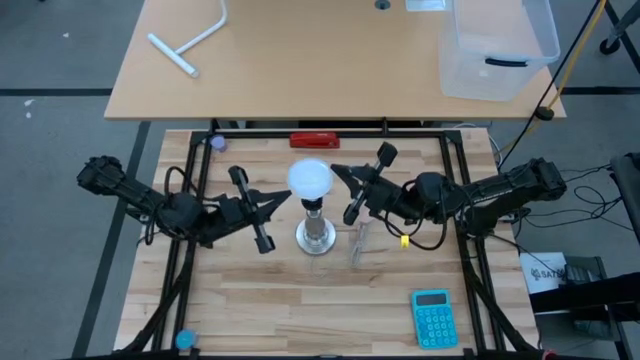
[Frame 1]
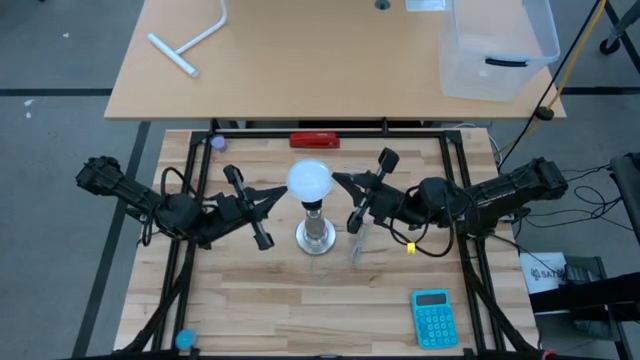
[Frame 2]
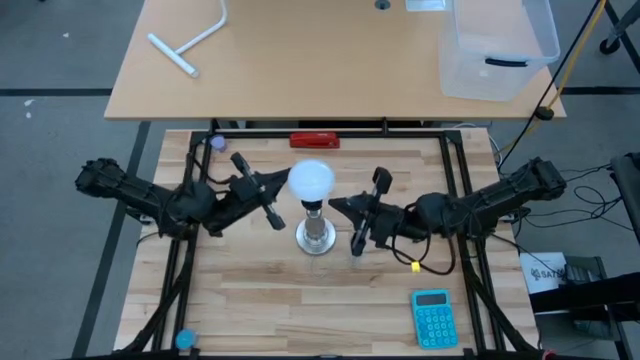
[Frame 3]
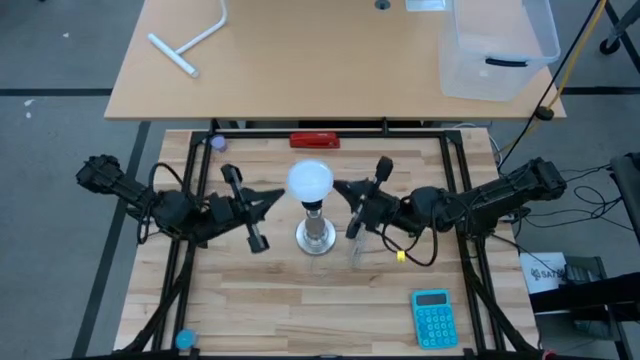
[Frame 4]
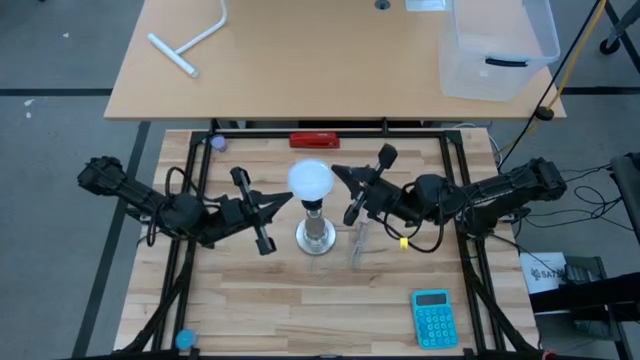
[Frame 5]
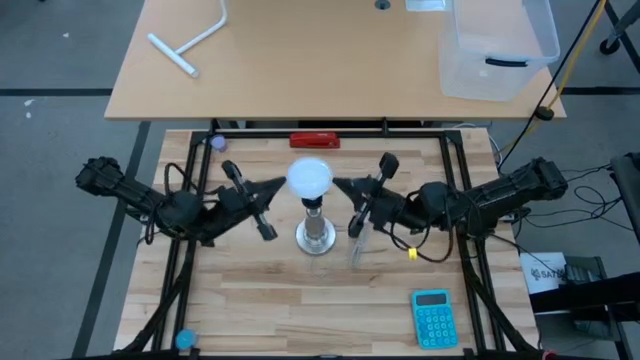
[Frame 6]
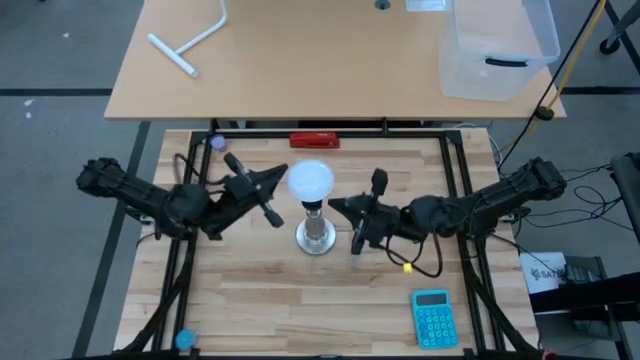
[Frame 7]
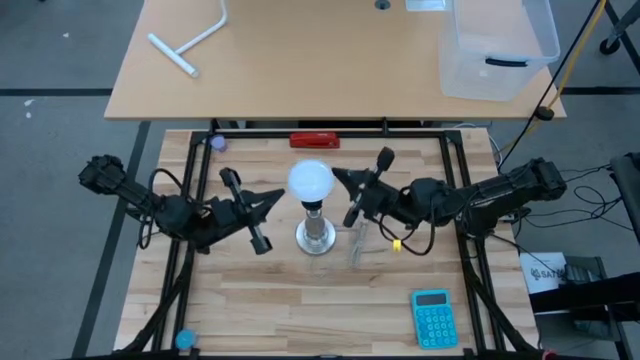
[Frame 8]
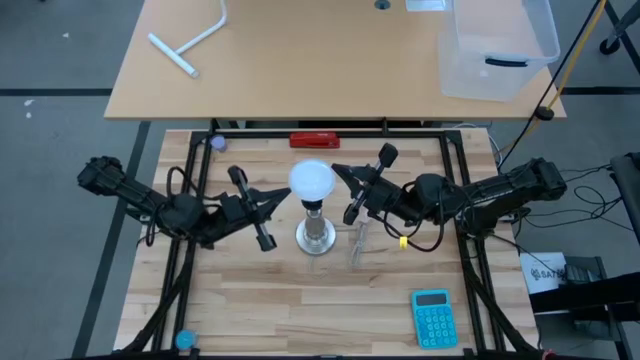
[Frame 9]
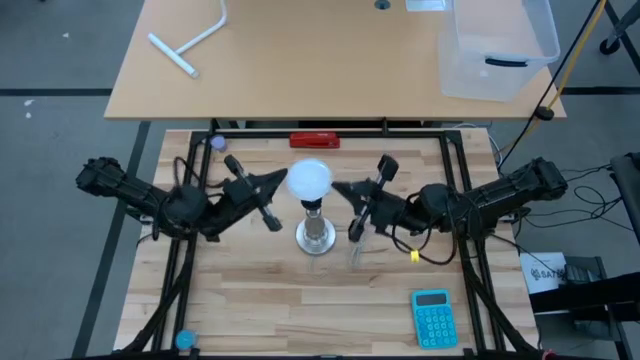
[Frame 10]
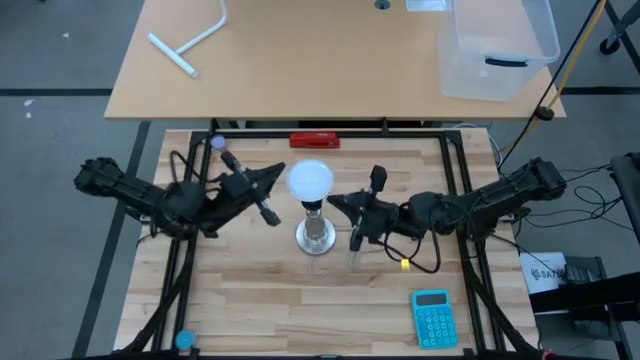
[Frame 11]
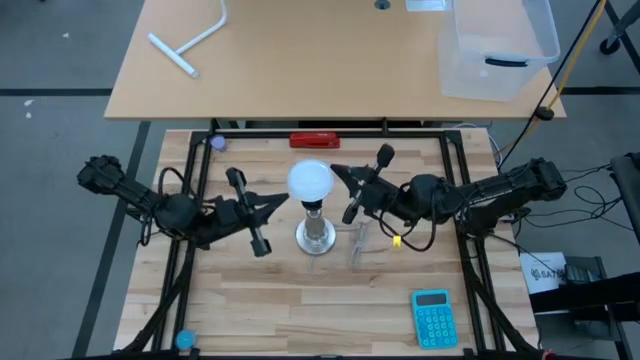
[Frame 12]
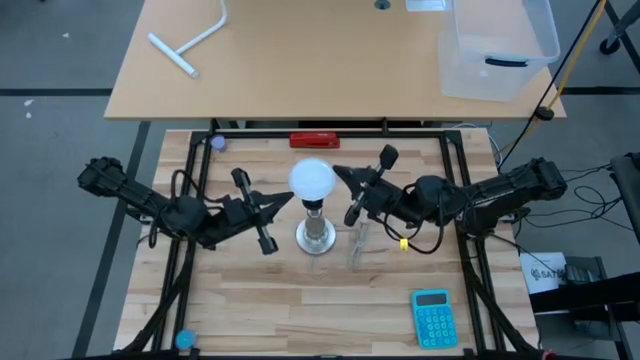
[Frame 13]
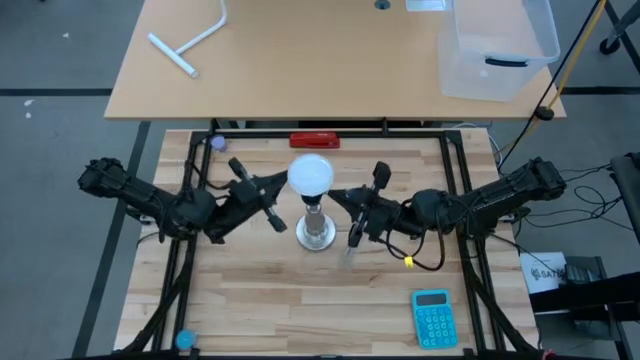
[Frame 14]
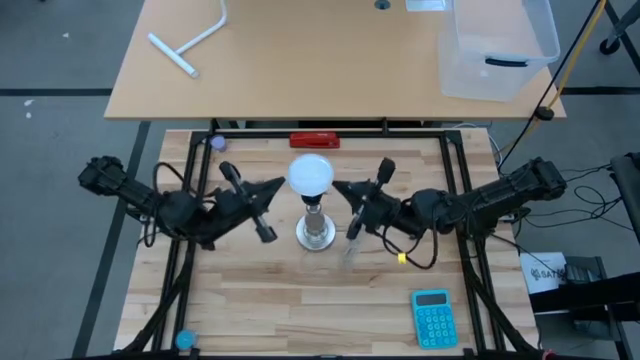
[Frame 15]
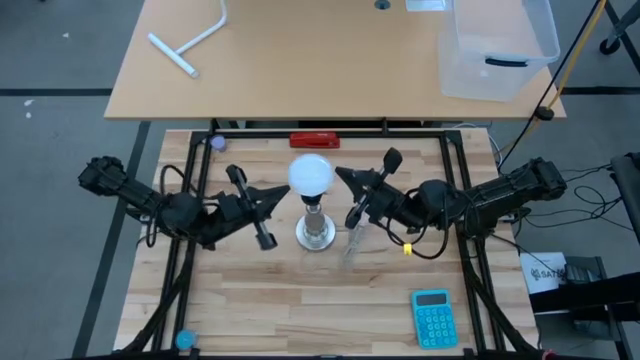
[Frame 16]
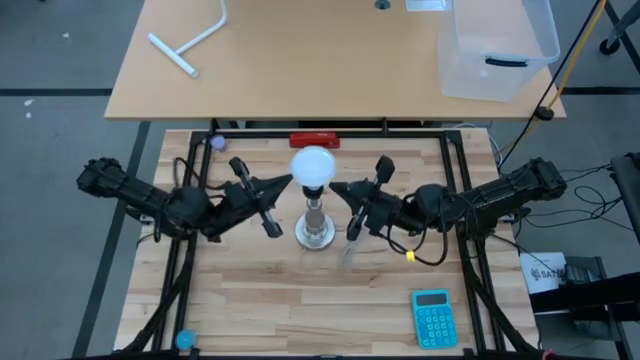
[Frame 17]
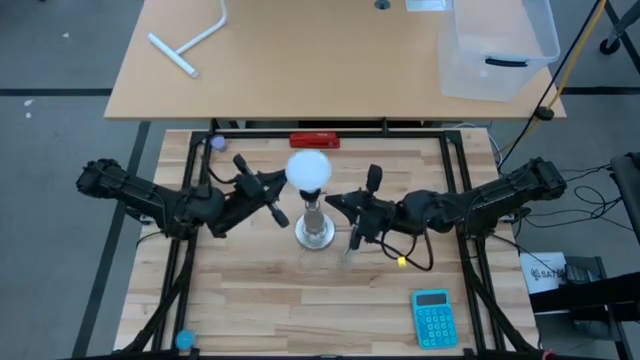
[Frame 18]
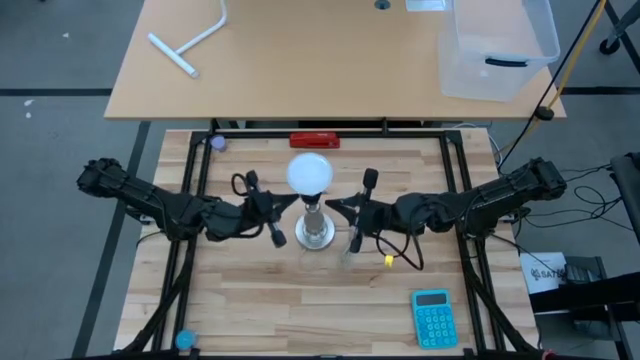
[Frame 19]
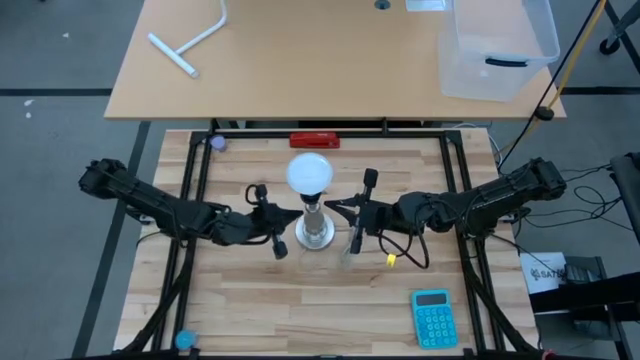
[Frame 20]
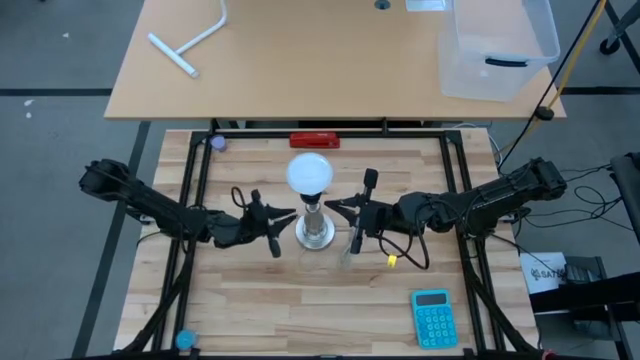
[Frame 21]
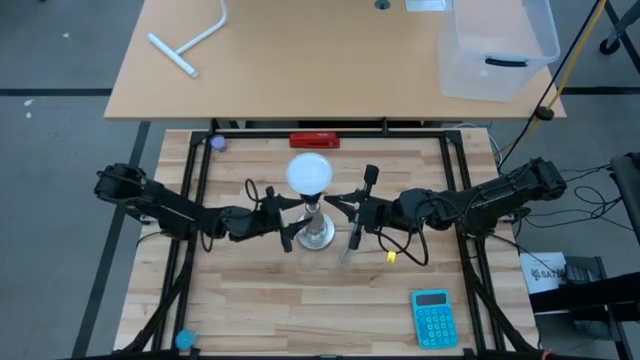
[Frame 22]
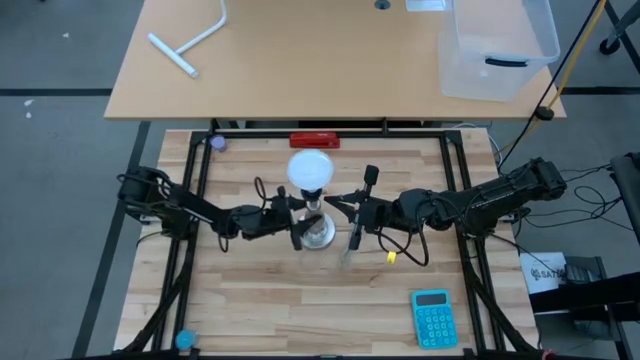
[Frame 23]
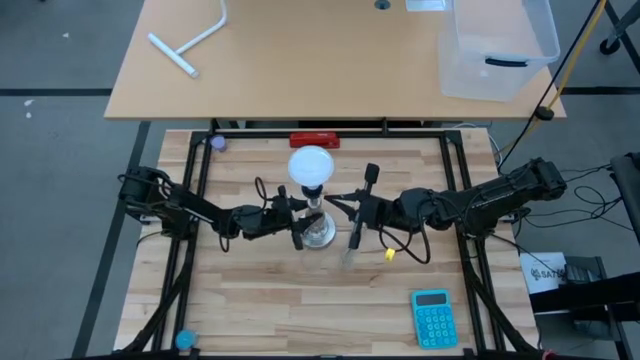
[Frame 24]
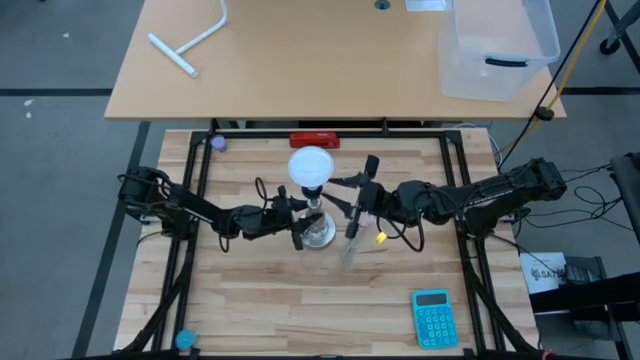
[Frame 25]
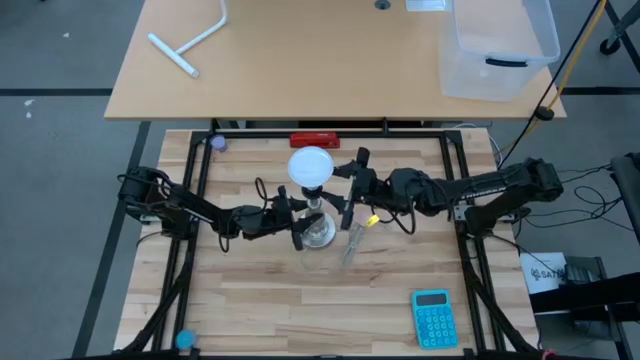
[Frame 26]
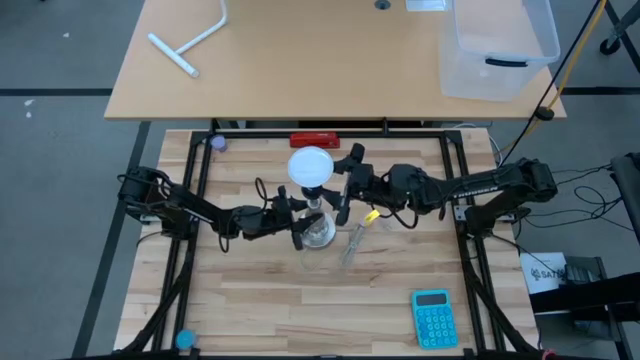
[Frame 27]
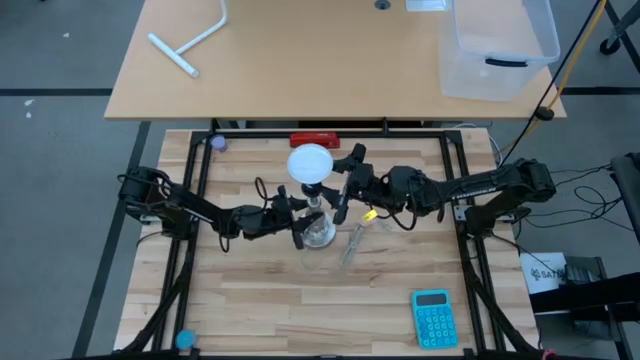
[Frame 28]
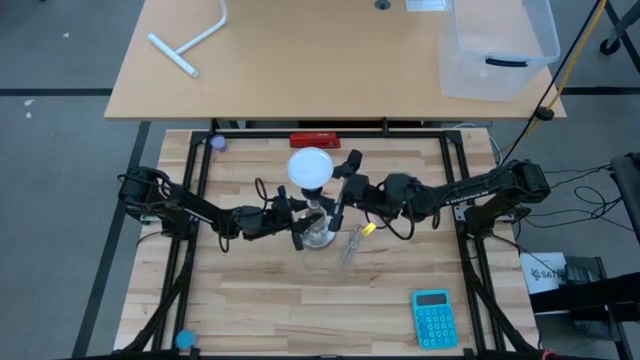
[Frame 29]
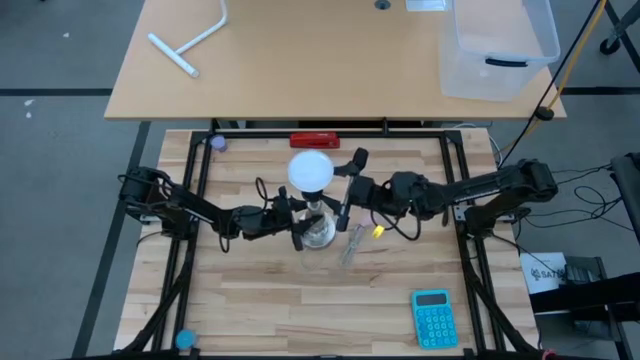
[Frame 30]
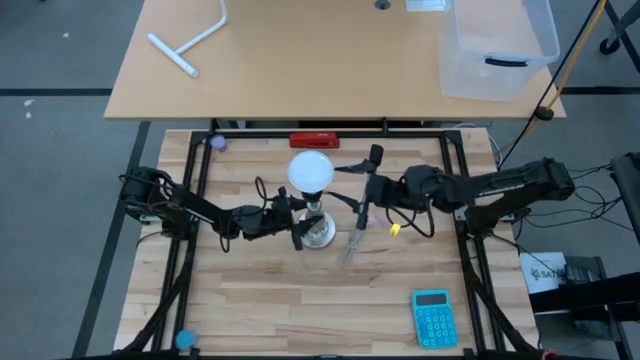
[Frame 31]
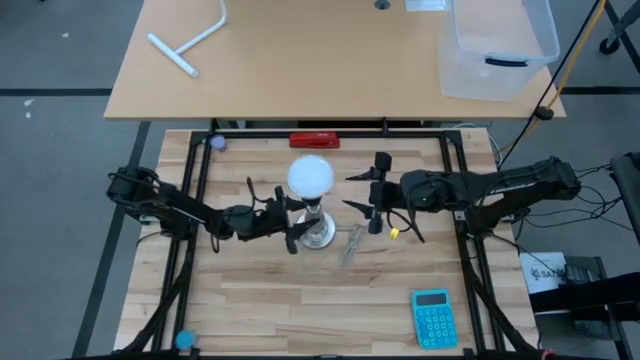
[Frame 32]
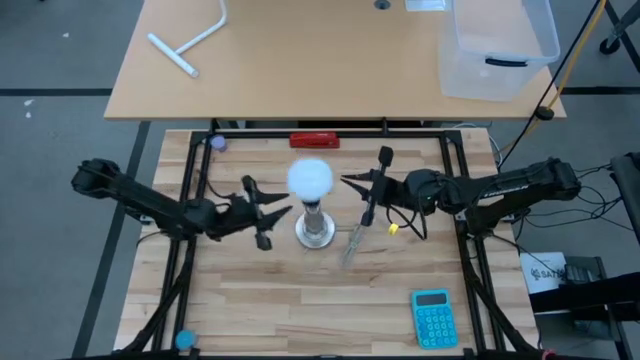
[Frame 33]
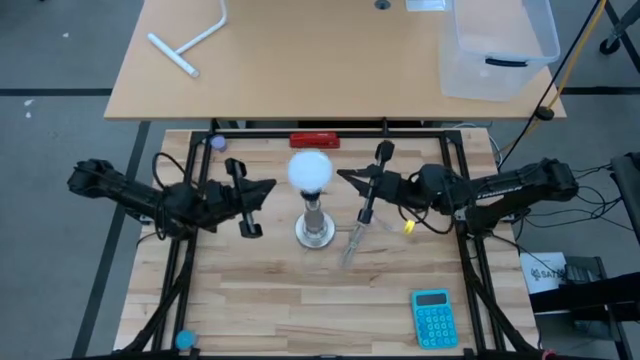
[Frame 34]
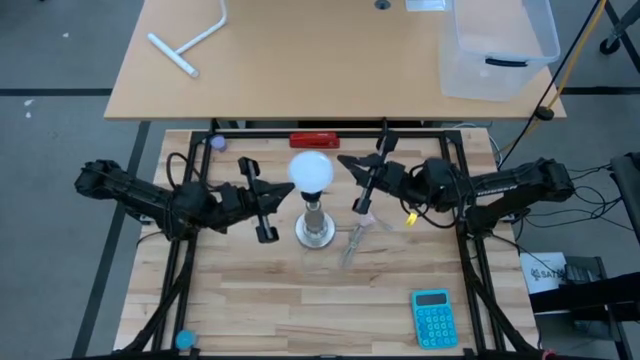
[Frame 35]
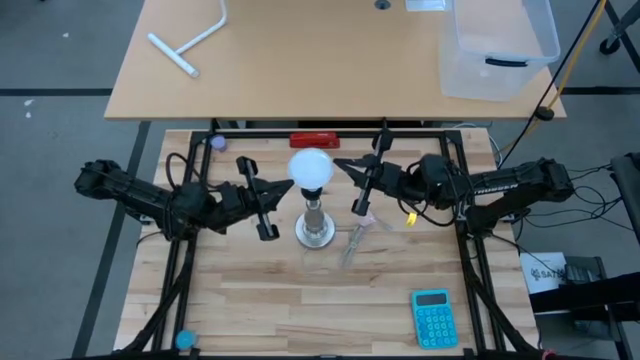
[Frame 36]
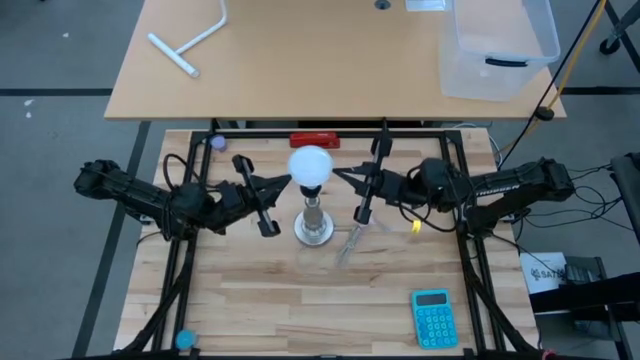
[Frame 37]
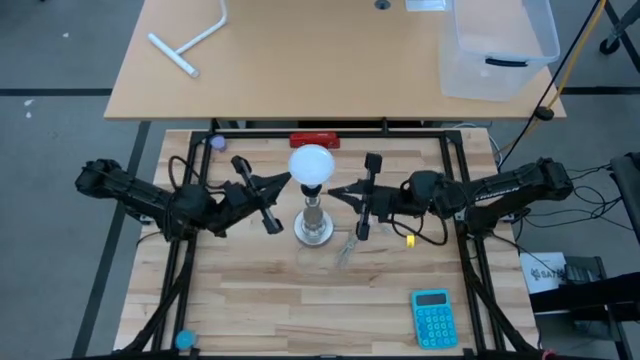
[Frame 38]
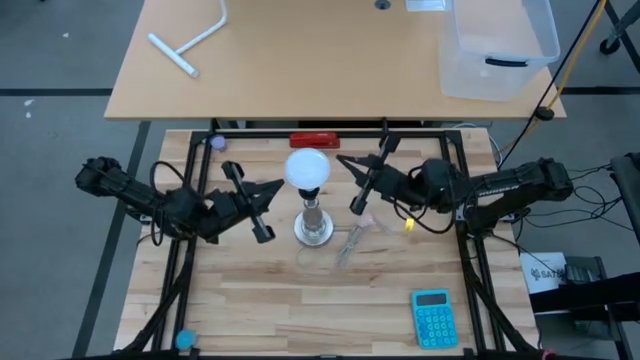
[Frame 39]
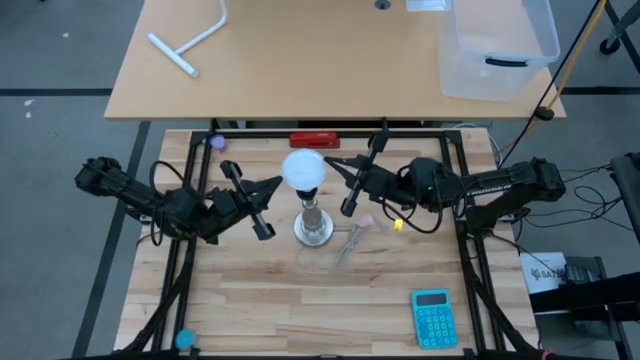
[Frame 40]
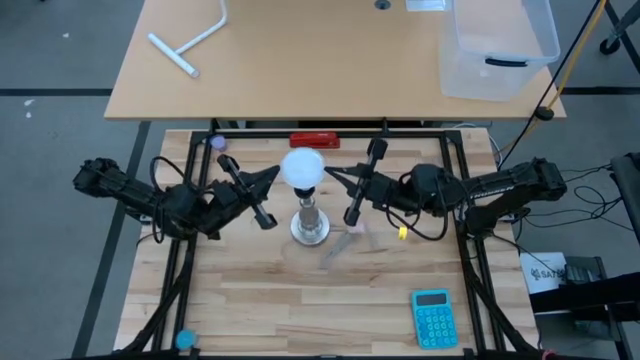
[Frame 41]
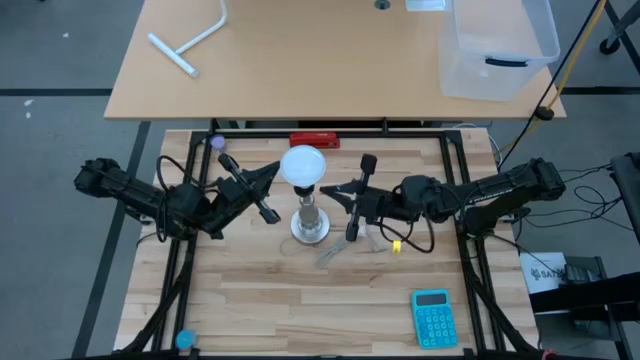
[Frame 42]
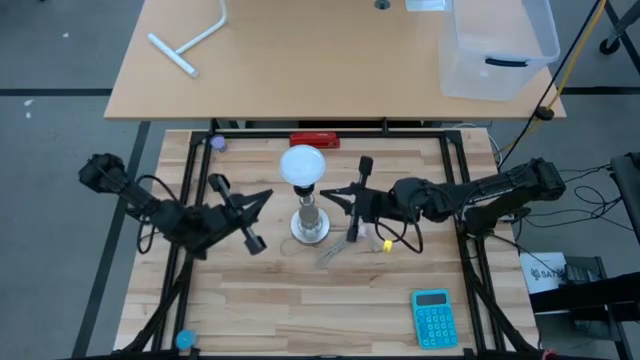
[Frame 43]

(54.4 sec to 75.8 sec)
Task: Screw lightbulb
Insert the white lightbulb into the silver lamp
